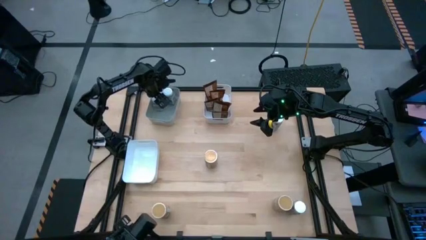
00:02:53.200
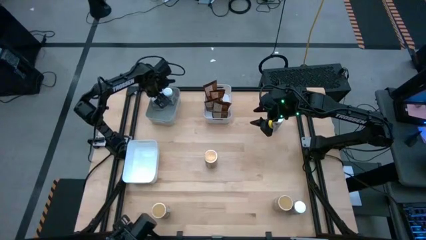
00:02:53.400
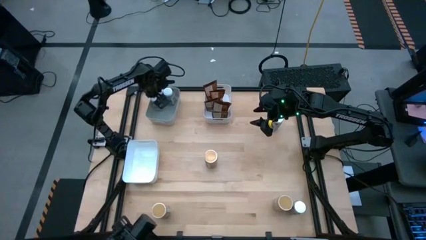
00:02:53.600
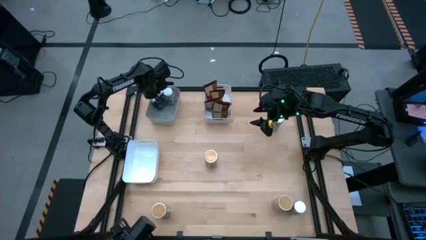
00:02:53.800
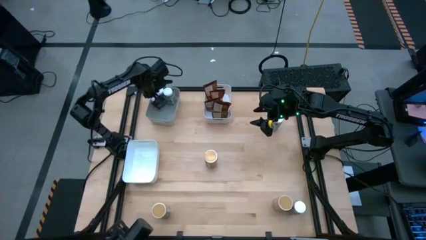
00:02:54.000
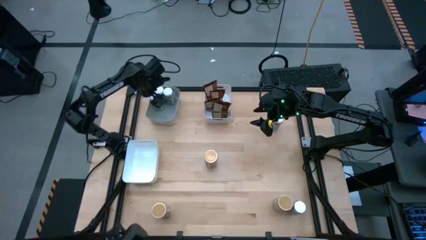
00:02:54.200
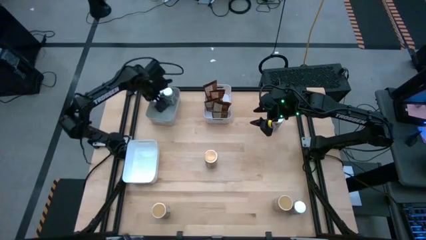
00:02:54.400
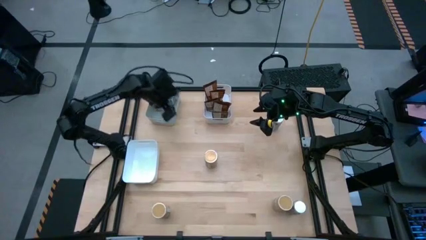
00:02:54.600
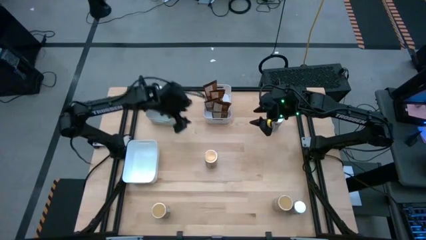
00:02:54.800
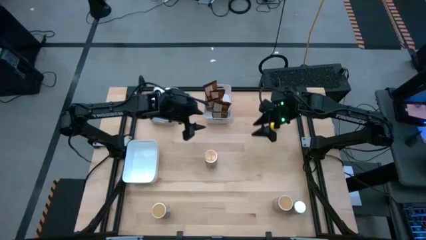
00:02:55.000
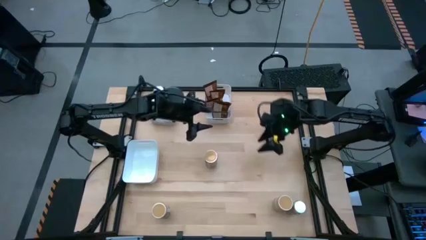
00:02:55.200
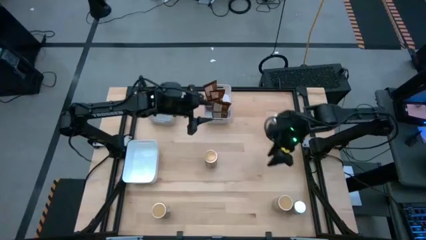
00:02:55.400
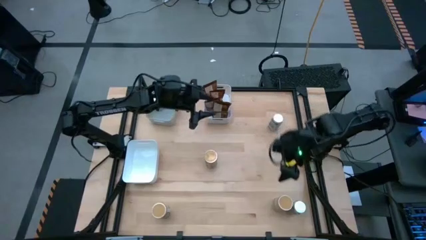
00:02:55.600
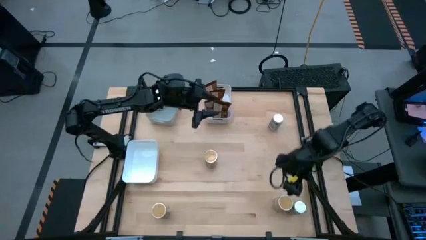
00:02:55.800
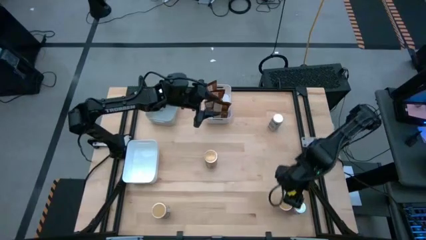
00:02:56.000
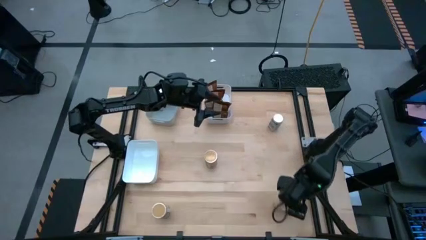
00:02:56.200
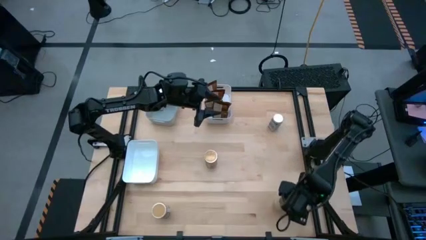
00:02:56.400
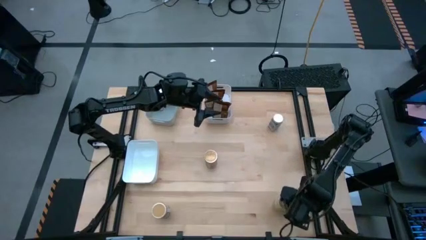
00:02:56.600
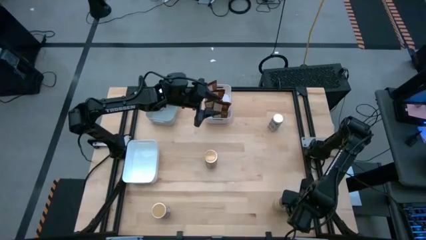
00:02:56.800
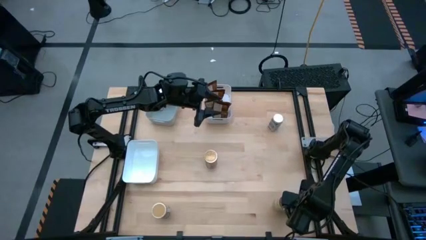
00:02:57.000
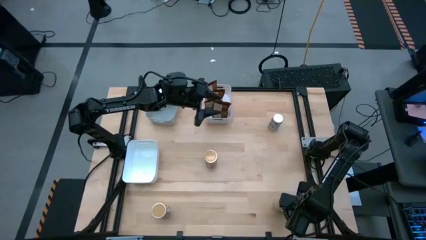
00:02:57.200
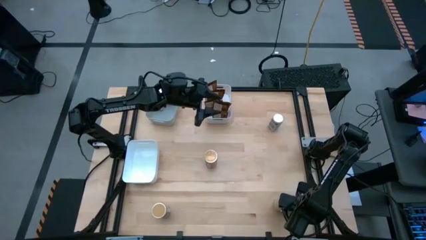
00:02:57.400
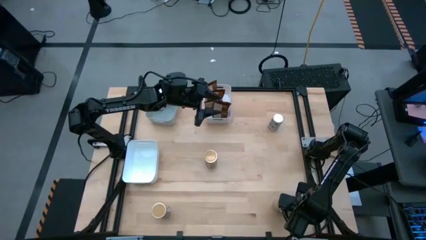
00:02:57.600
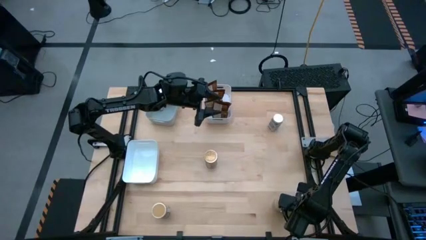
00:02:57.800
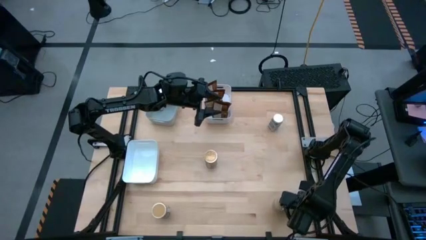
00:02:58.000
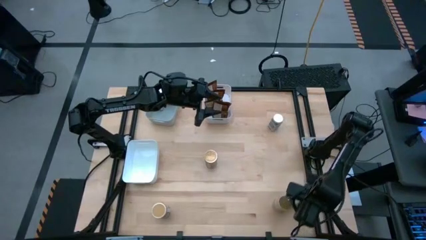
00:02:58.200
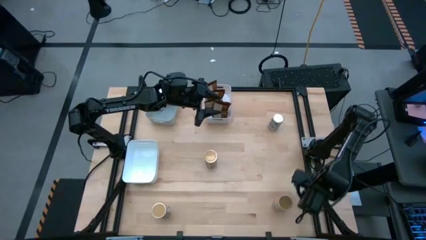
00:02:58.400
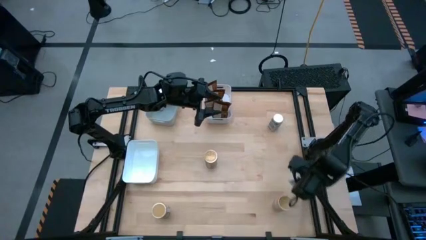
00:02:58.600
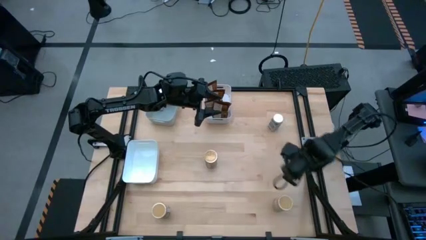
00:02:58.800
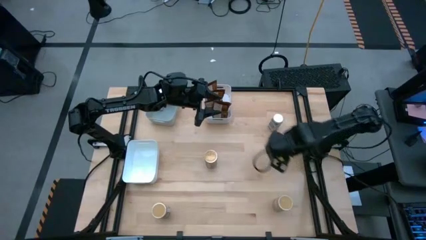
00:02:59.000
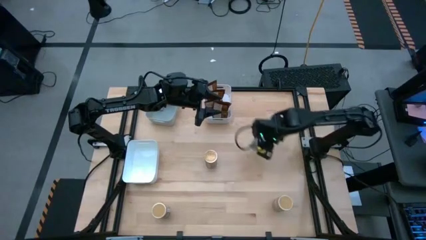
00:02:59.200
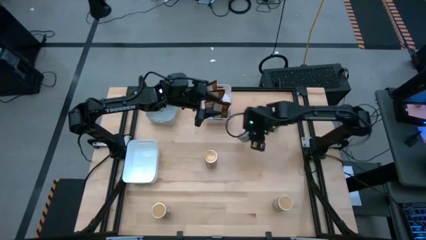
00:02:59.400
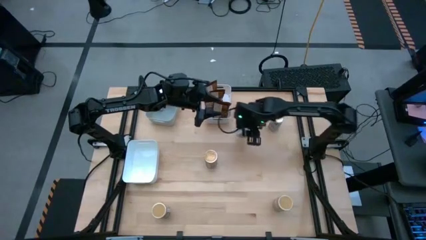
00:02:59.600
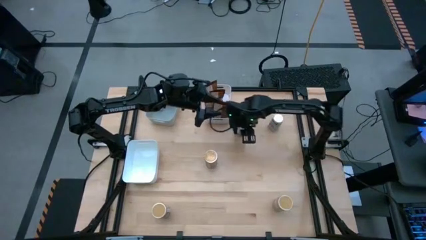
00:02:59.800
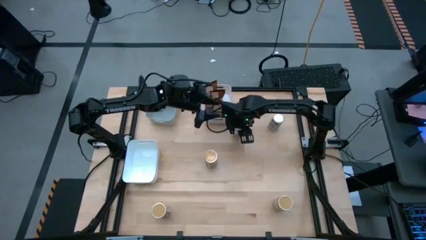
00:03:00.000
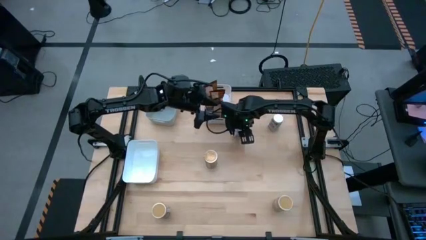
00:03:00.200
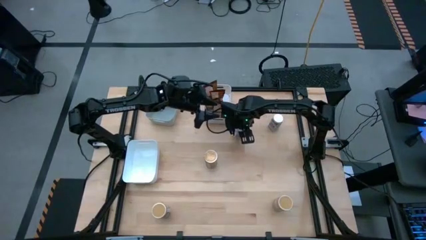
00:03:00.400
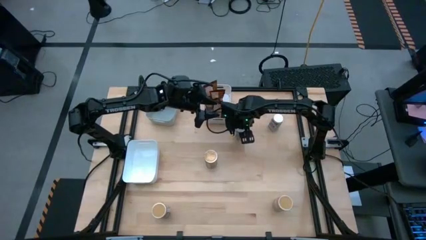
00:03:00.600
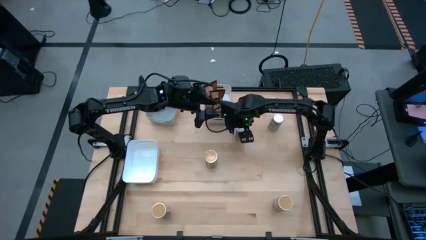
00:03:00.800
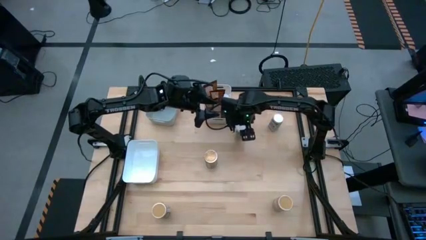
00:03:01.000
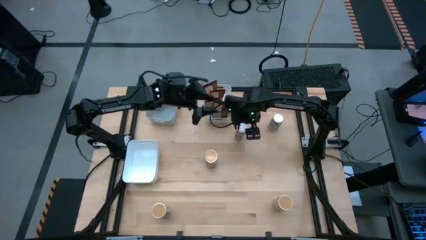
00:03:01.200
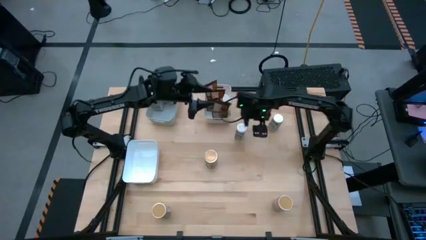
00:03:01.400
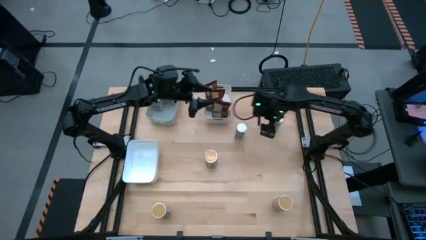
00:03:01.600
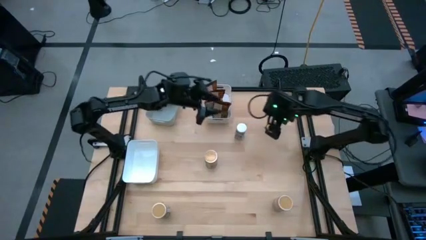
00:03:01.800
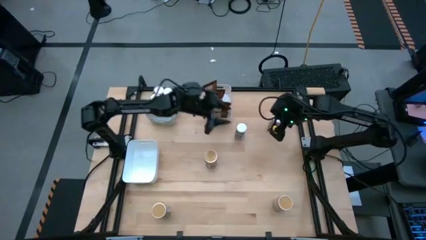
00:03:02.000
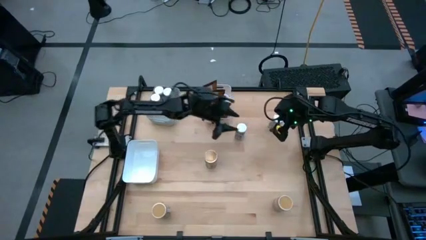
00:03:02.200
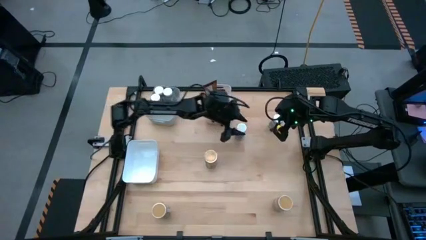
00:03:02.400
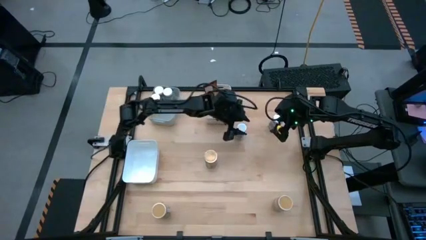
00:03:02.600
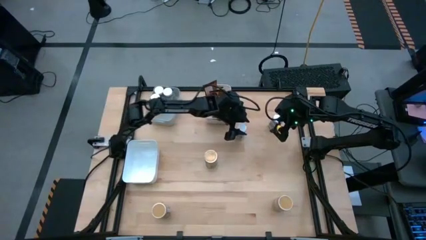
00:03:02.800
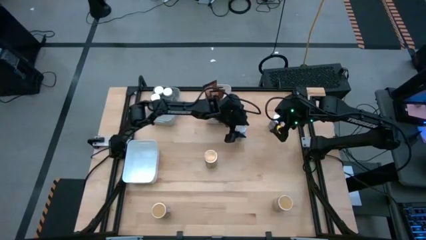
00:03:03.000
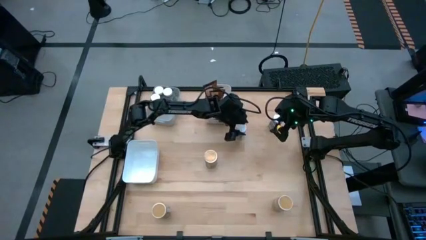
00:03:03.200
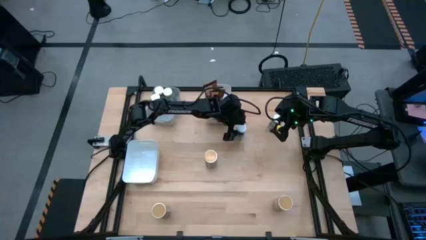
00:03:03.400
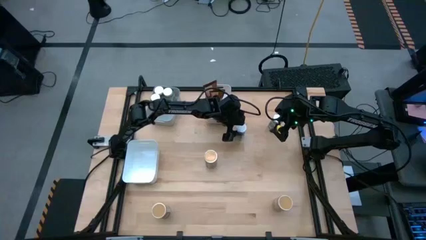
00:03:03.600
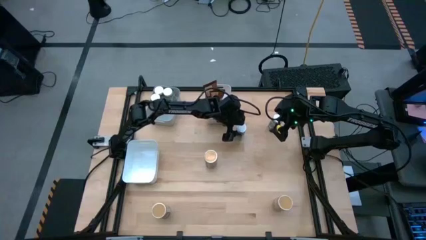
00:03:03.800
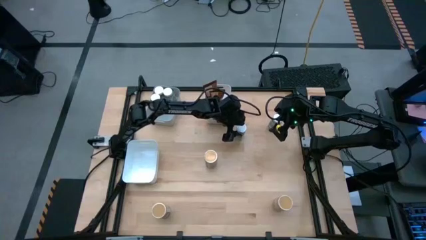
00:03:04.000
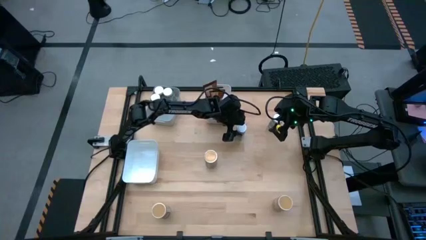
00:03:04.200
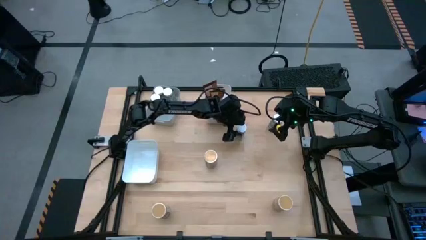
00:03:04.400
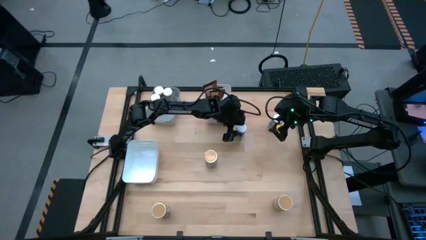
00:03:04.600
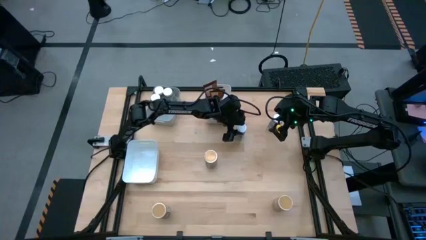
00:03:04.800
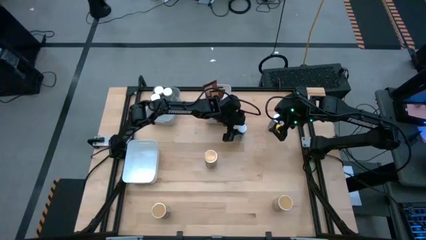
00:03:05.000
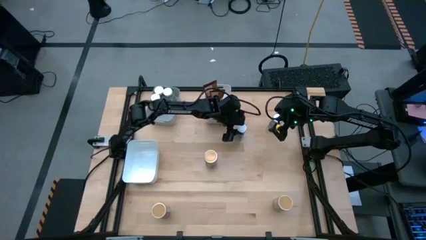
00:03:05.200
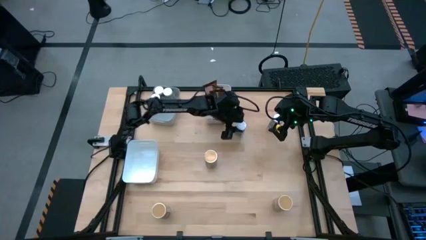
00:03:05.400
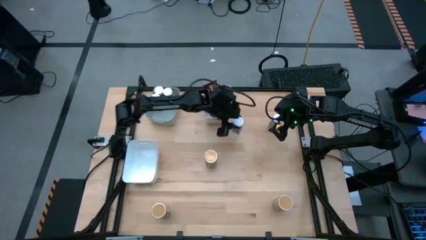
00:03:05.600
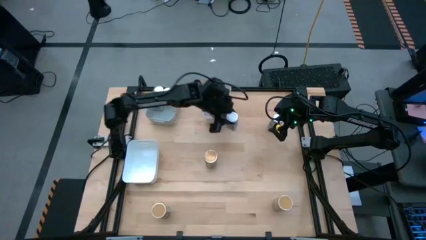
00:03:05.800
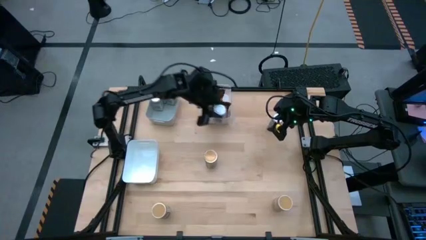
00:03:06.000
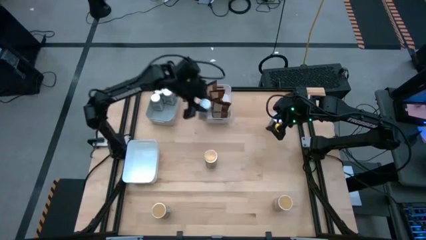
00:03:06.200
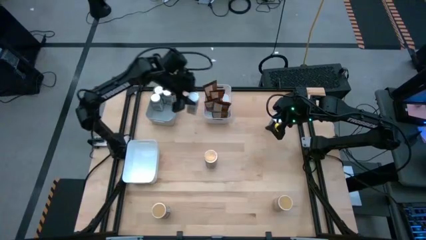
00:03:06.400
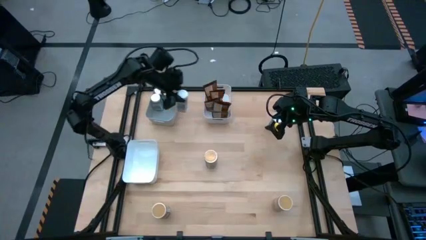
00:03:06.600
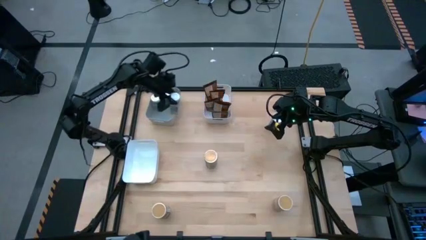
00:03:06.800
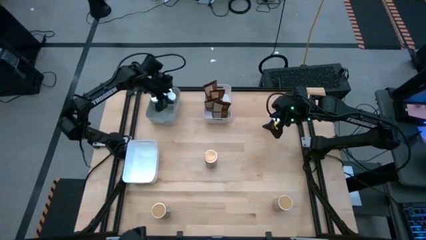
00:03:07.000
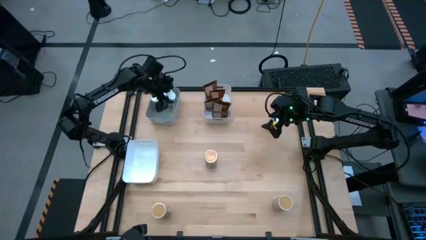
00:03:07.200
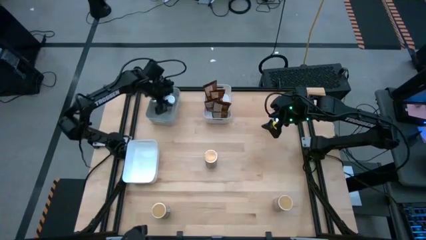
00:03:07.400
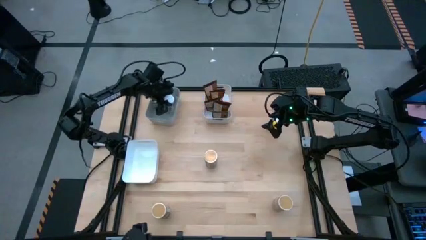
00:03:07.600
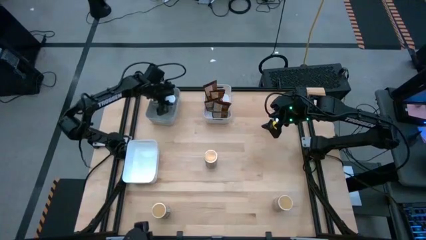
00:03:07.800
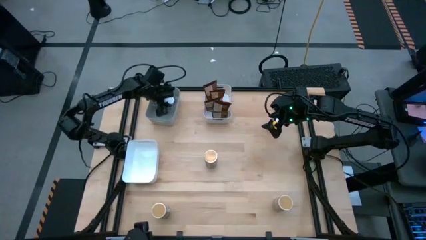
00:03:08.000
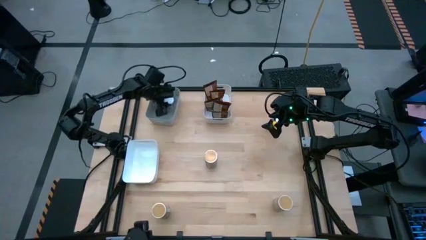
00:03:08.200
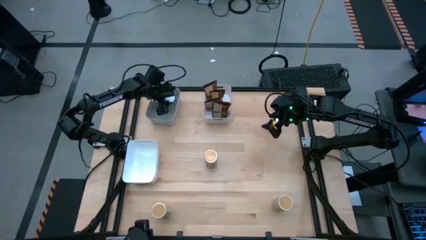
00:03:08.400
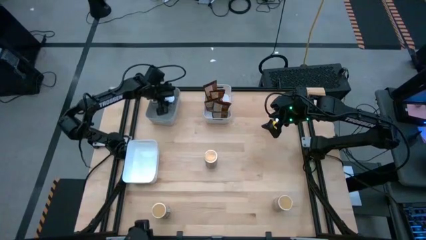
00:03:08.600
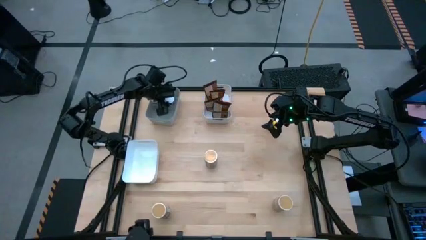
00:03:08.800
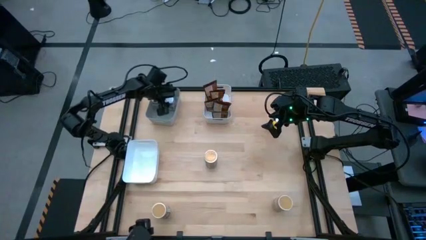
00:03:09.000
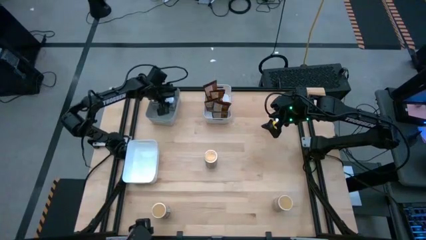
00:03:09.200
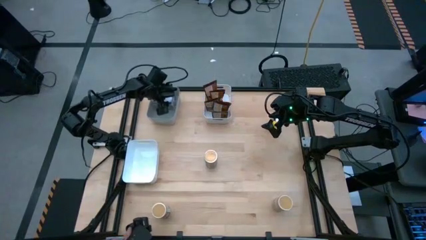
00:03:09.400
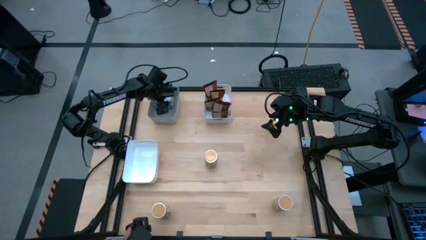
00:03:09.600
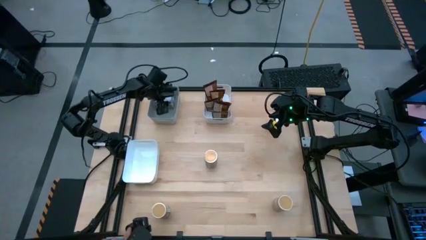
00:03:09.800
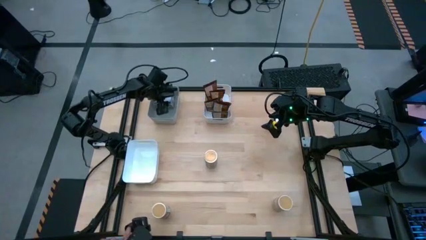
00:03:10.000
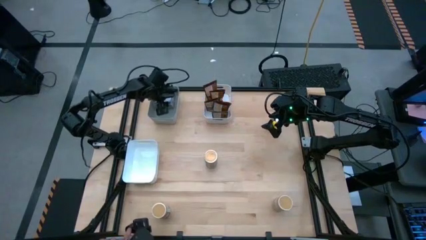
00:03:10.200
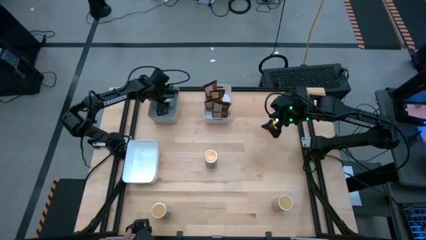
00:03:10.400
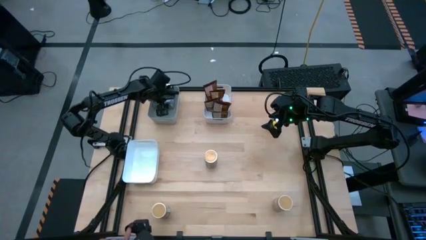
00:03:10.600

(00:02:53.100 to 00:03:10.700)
Task: Sort spices by type
Put the white seasoning bottle into the gray bin
